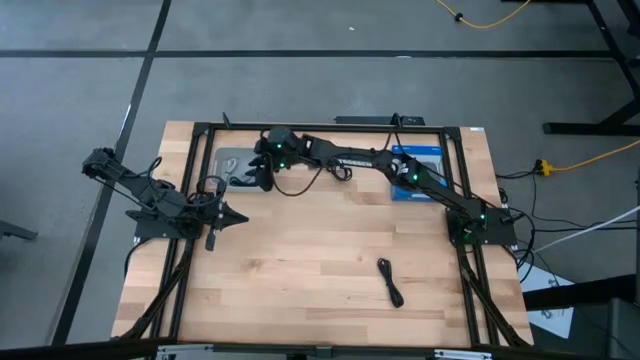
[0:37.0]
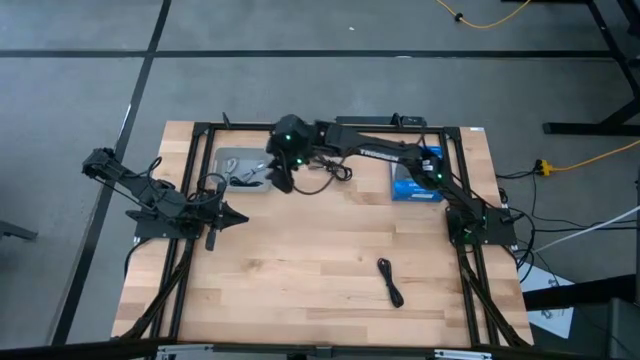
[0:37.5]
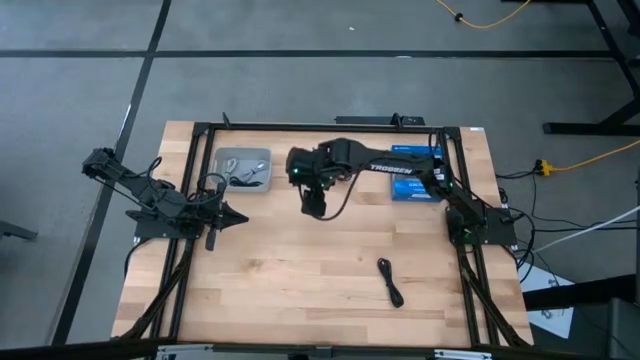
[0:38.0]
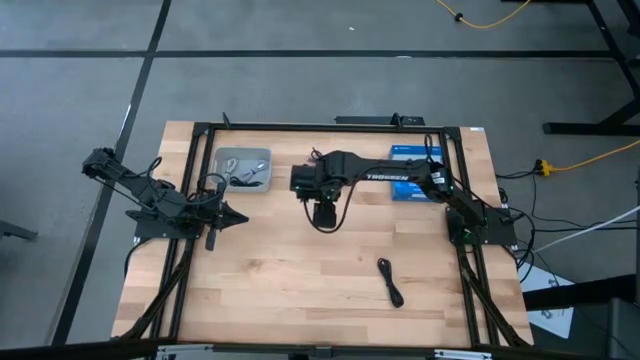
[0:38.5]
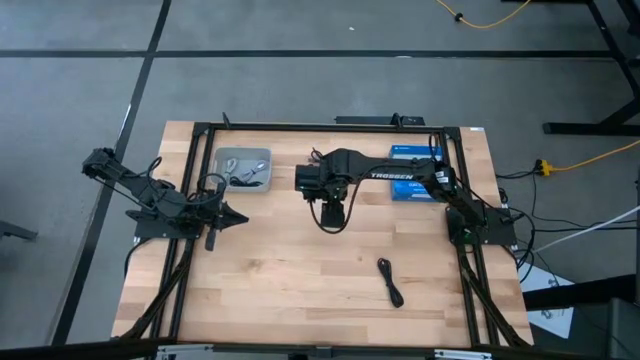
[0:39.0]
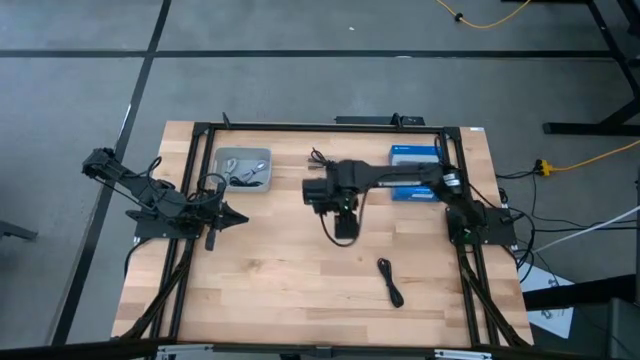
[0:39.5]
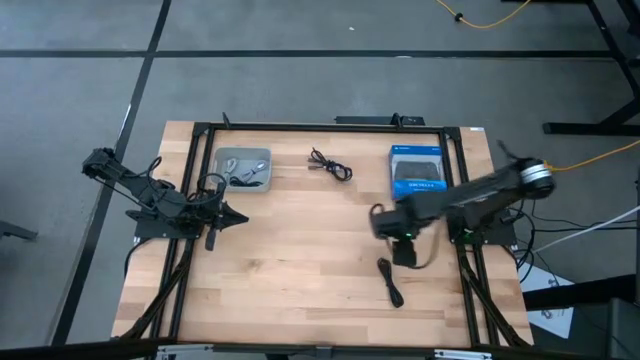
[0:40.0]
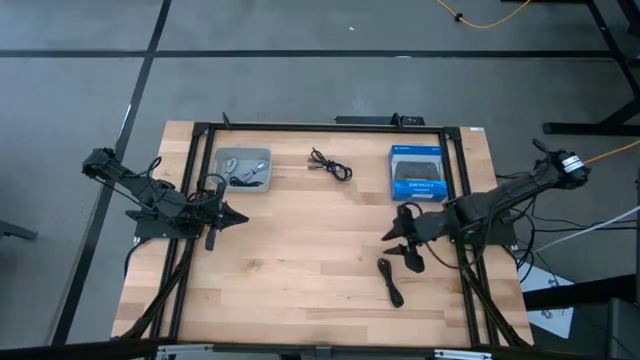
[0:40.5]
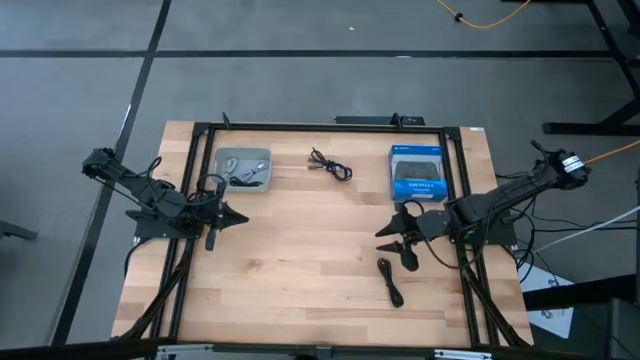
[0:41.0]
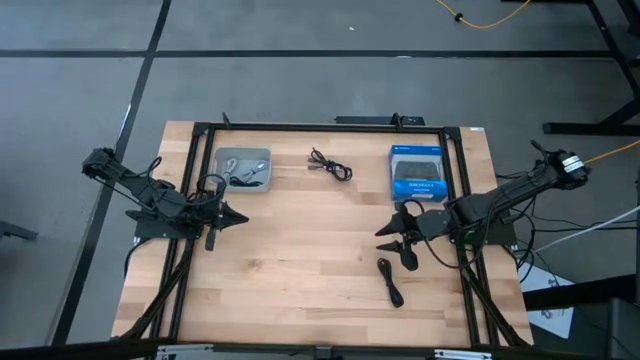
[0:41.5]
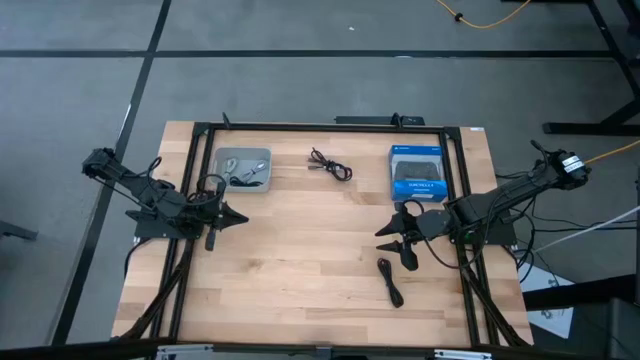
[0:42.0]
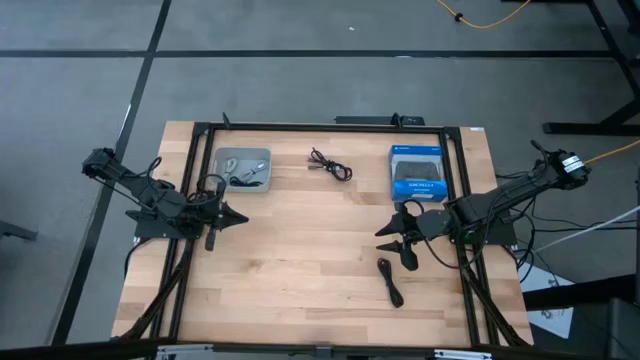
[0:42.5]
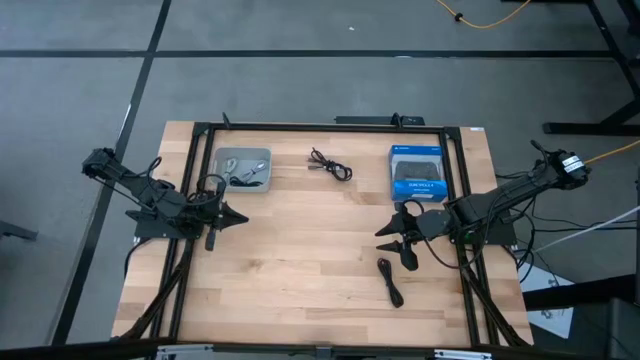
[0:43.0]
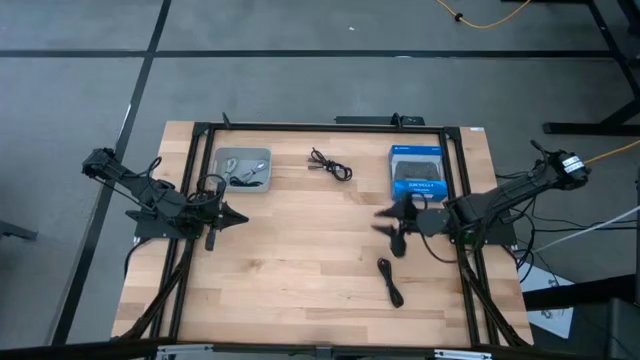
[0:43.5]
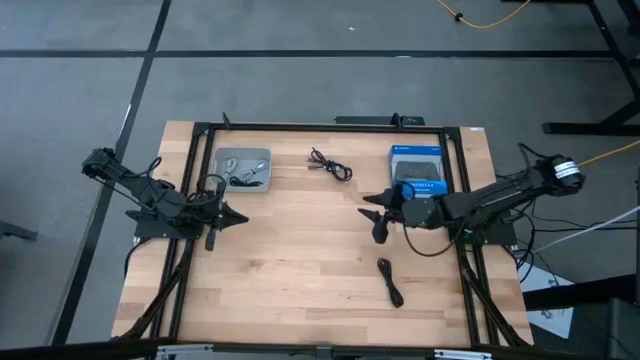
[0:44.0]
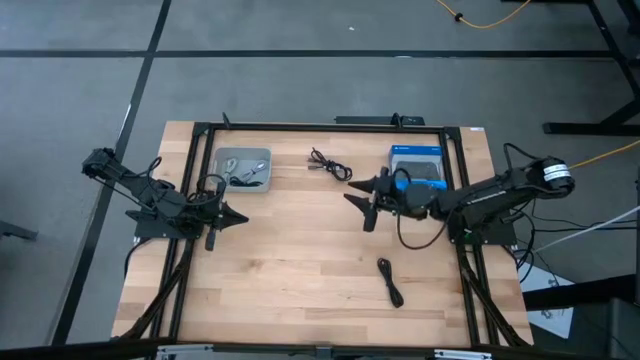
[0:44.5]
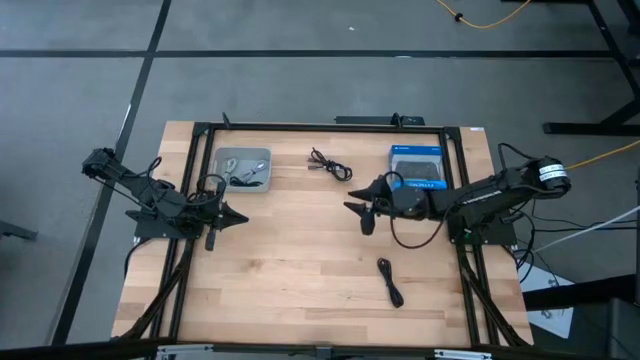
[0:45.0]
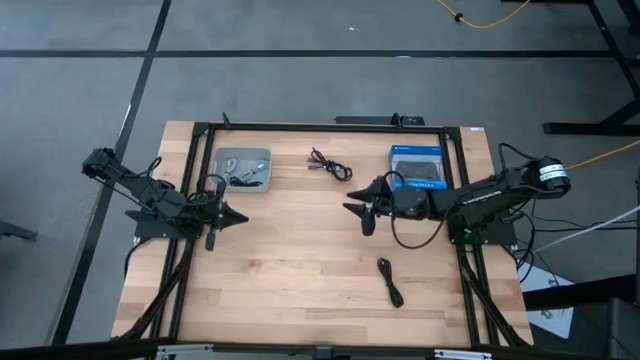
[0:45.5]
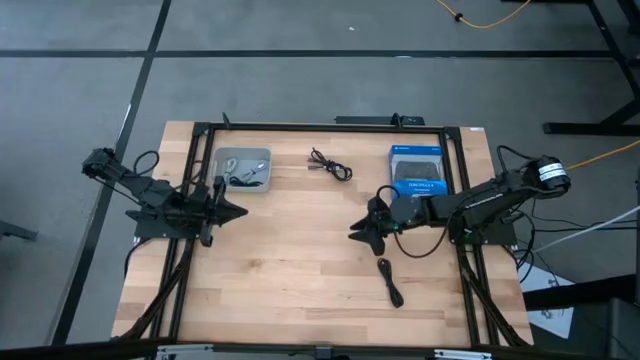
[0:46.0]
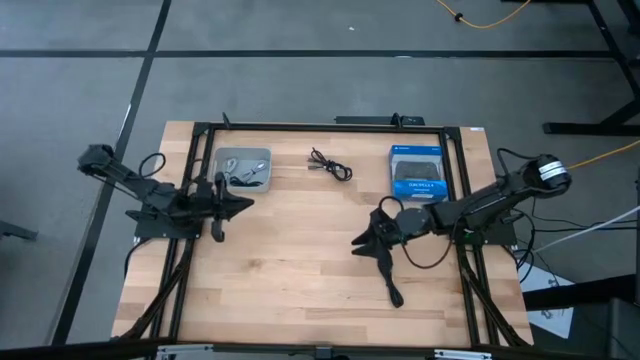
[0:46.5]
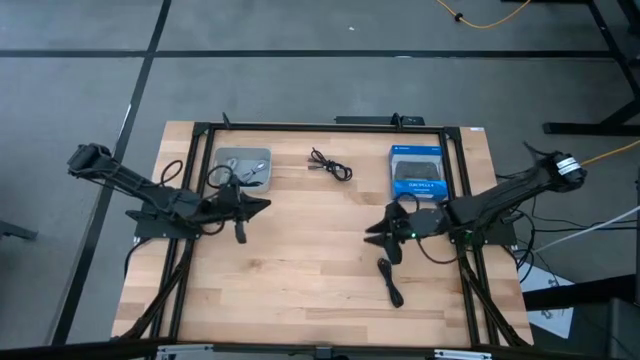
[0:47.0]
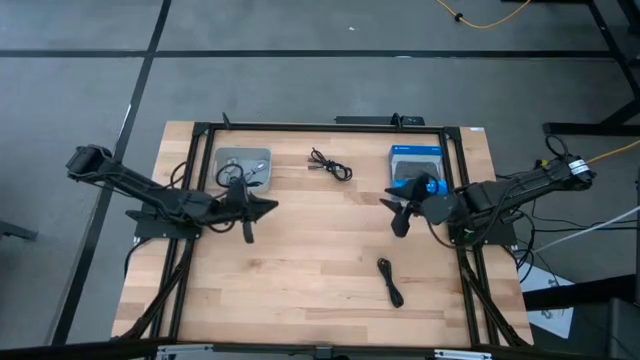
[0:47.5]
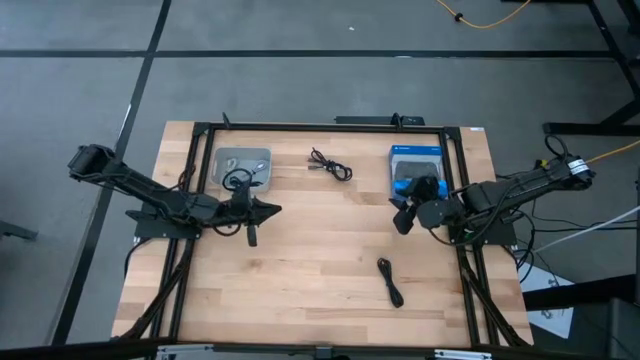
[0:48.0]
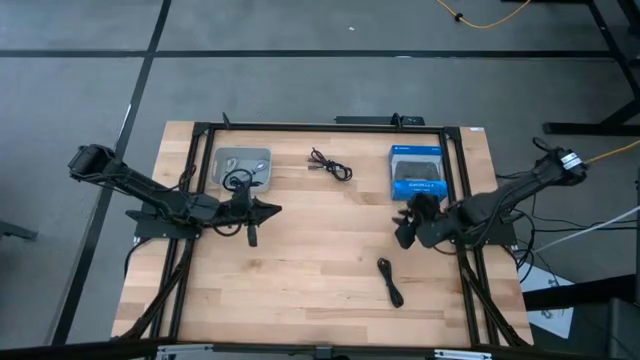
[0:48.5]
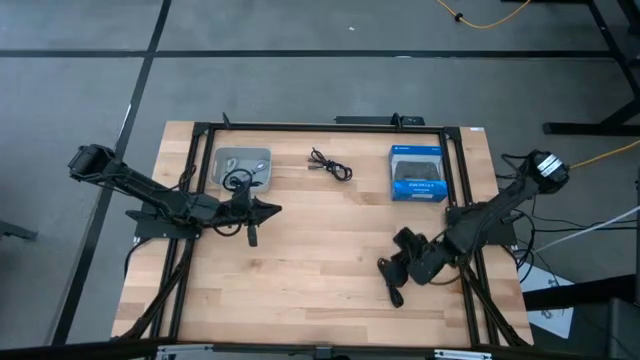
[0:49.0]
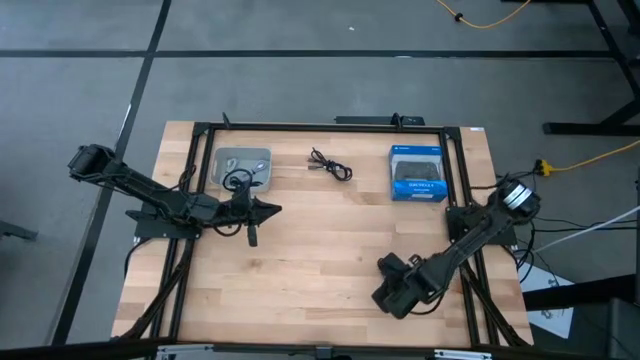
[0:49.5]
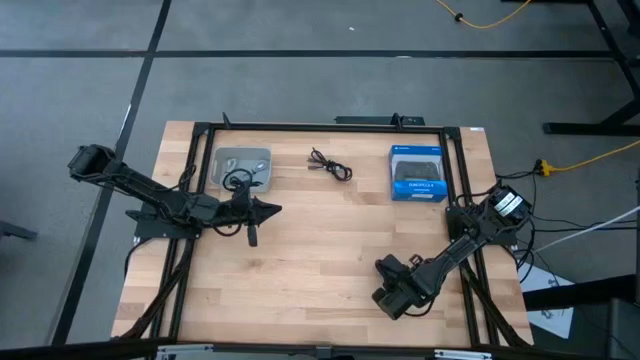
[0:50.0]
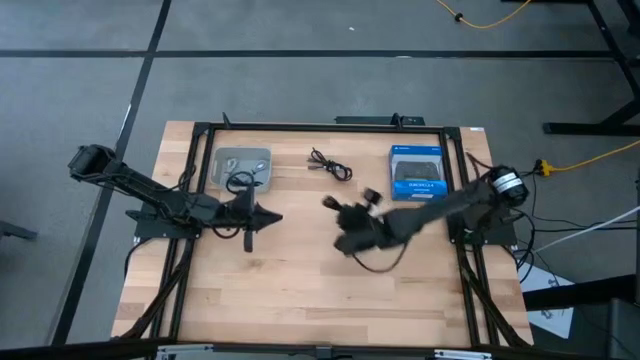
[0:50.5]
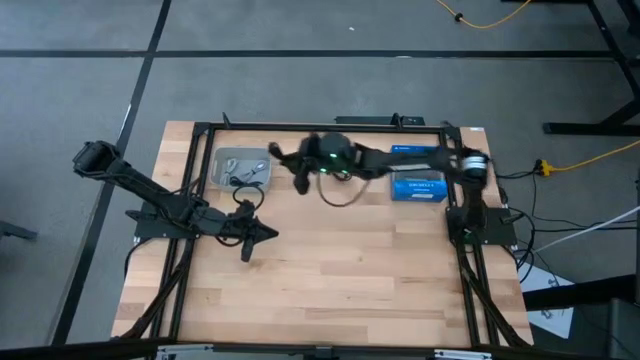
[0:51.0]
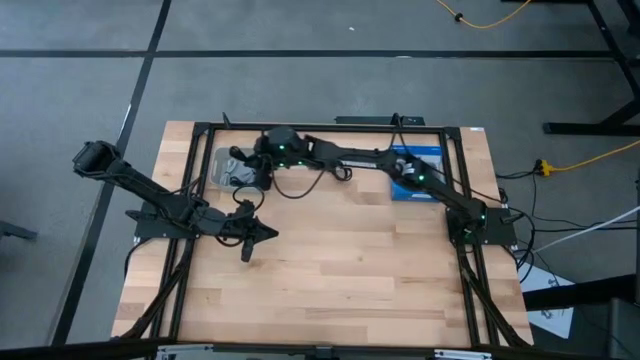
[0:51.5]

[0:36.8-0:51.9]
Task: Pick and place USB-C Cables
Put the bottom black charger cable into the gray bin

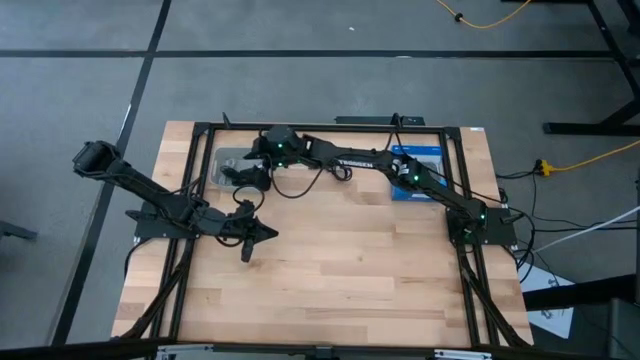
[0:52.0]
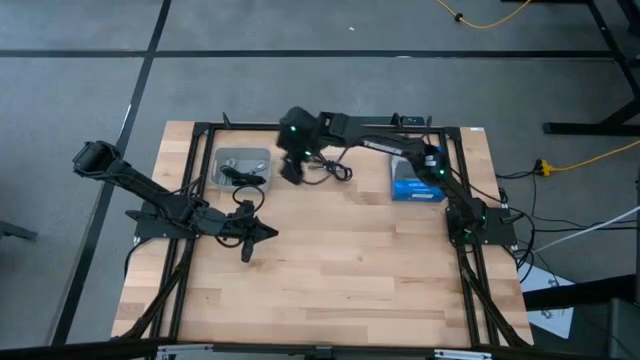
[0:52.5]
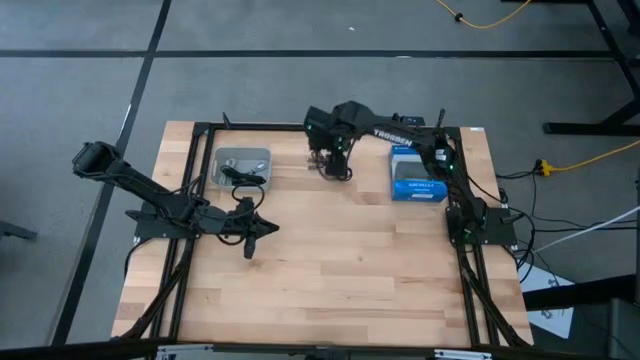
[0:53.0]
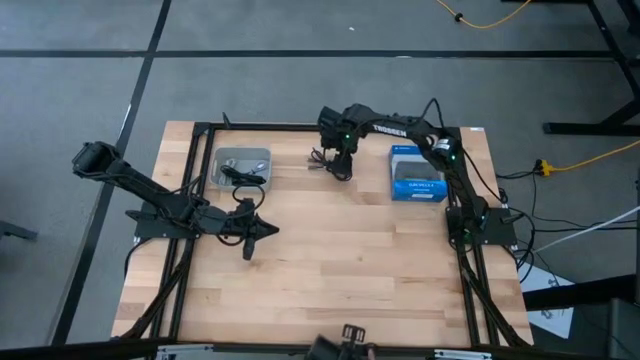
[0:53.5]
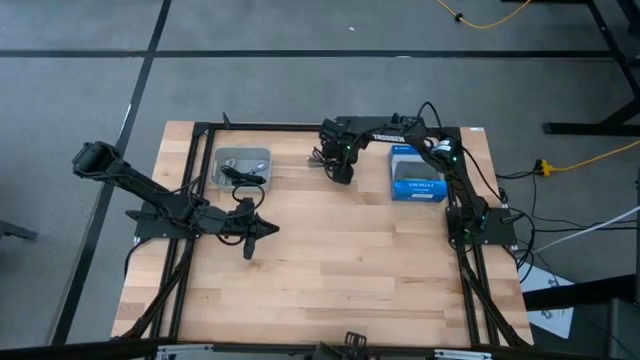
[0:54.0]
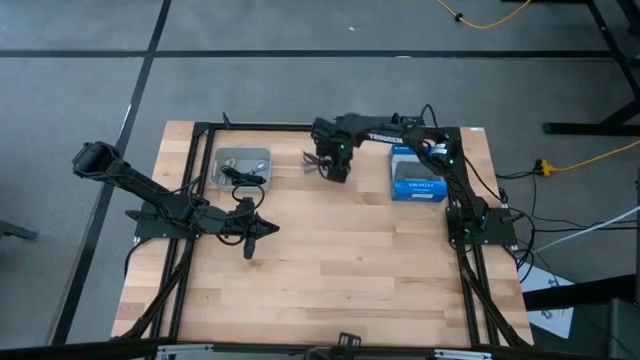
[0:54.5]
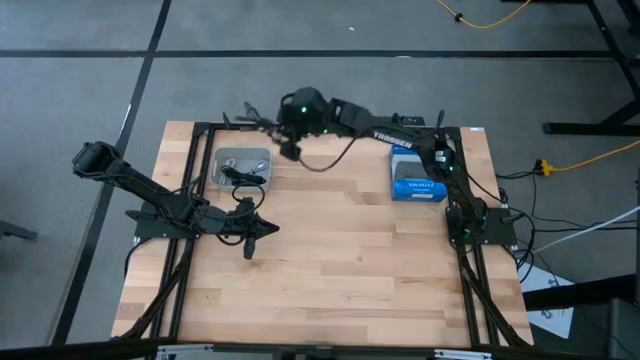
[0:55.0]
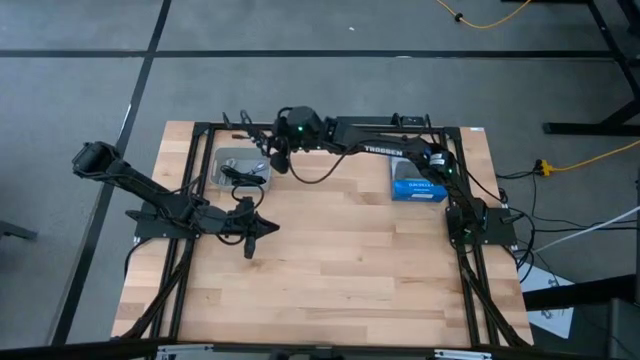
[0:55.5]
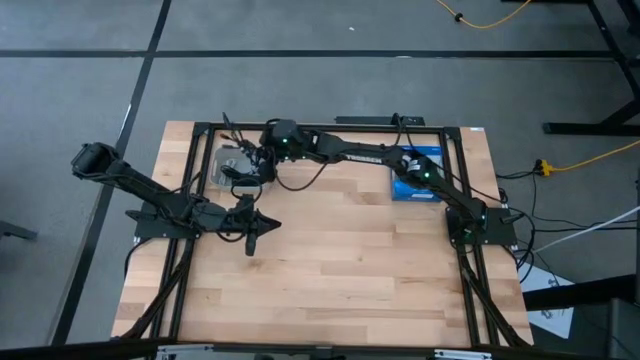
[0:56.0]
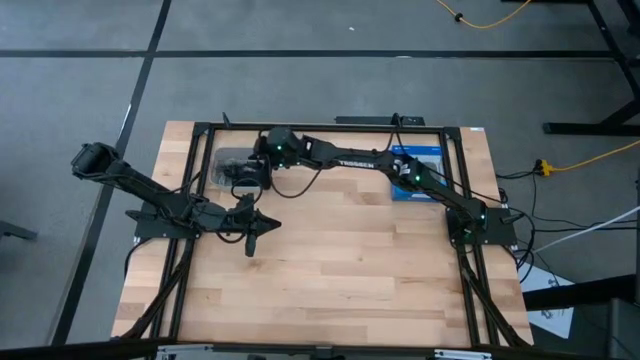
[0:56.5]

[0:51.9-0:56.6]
Put the black charger cable into the gray bin
